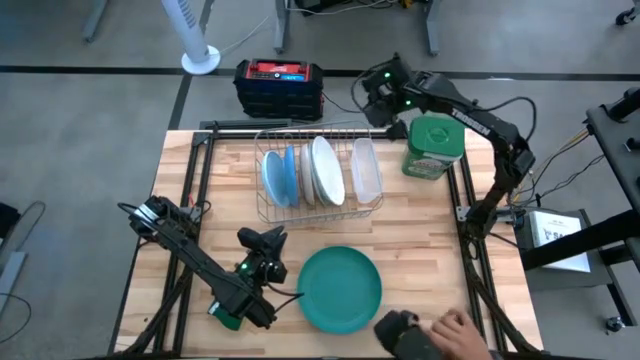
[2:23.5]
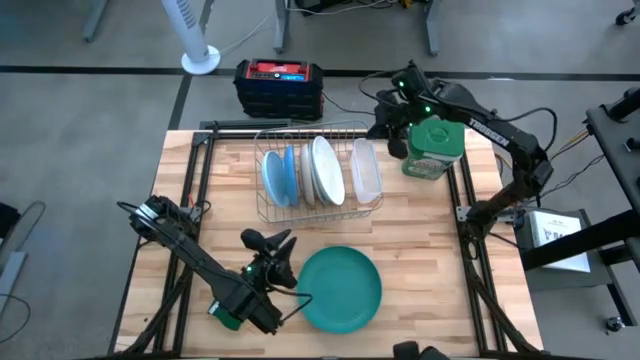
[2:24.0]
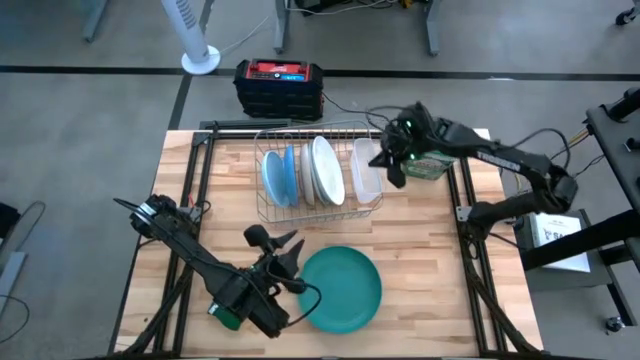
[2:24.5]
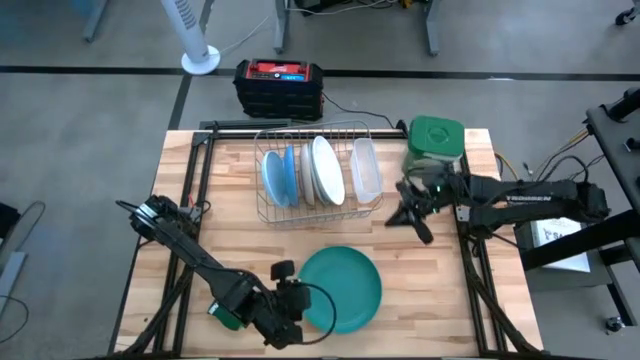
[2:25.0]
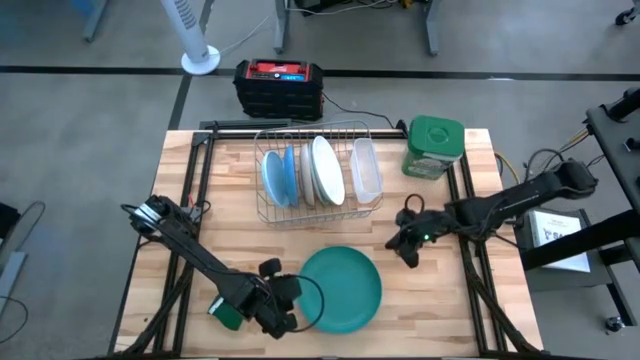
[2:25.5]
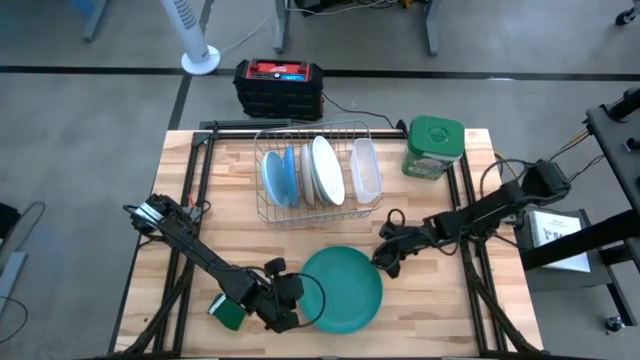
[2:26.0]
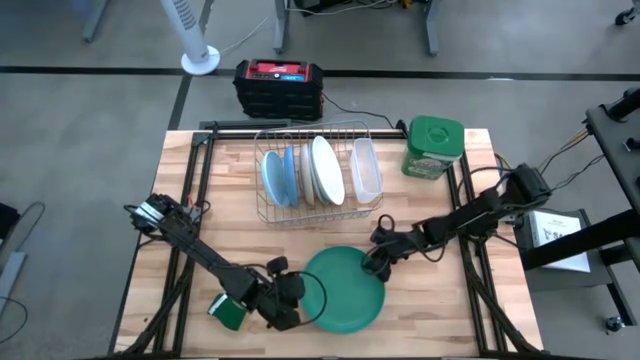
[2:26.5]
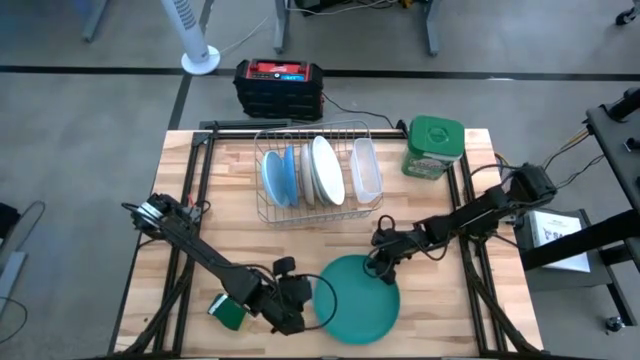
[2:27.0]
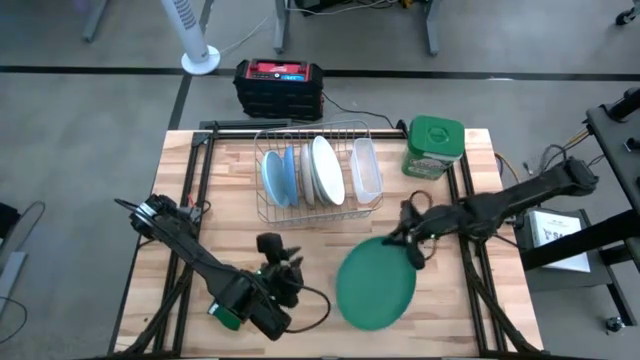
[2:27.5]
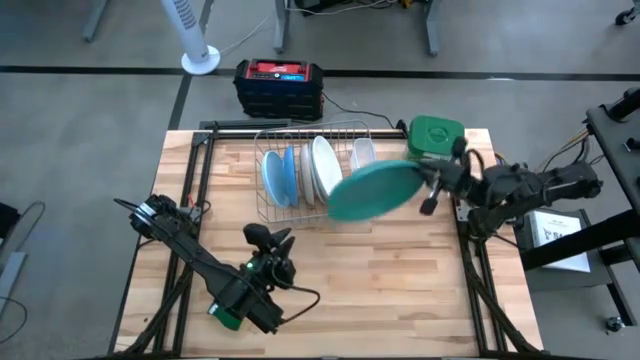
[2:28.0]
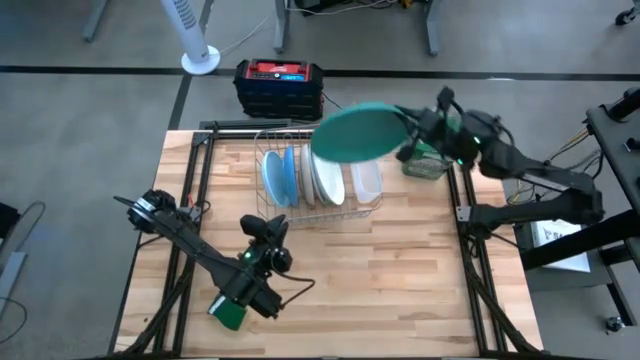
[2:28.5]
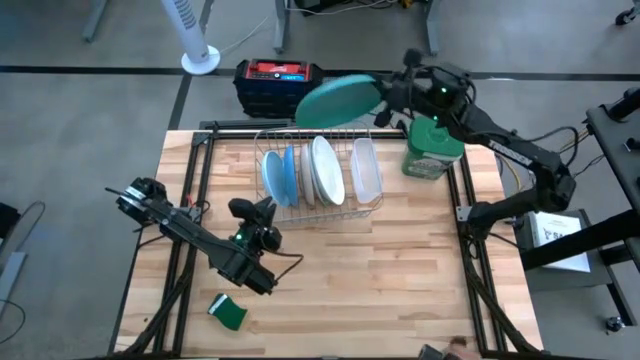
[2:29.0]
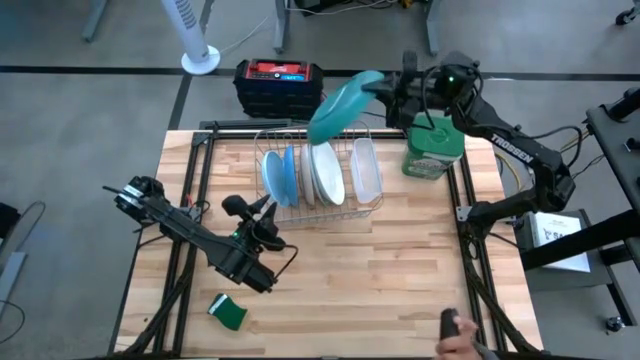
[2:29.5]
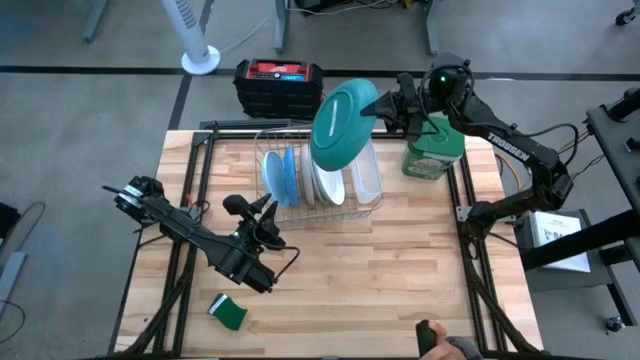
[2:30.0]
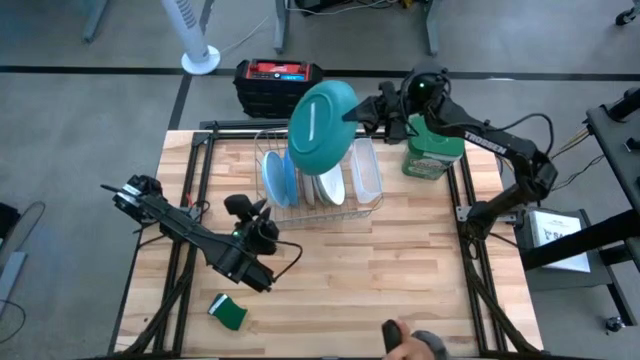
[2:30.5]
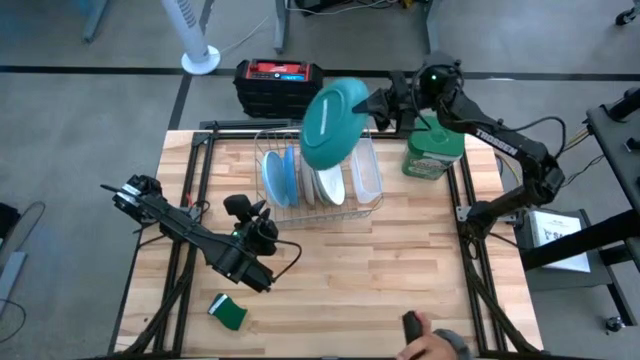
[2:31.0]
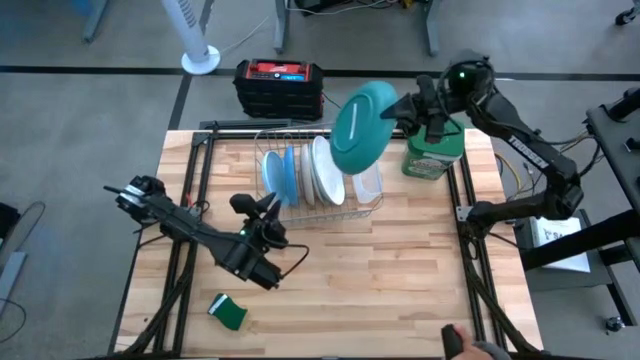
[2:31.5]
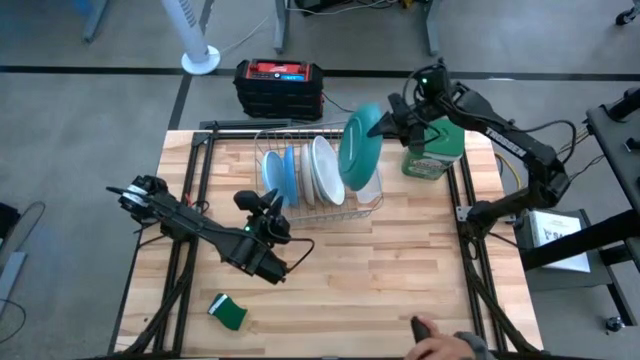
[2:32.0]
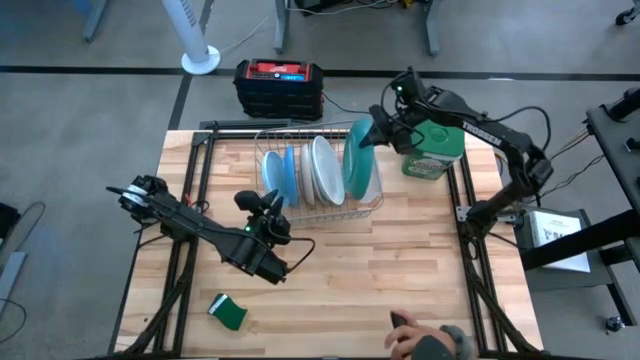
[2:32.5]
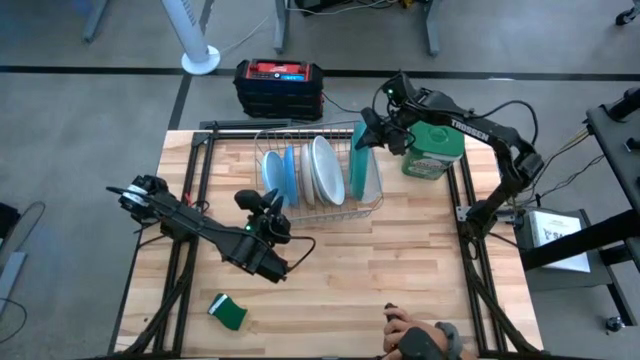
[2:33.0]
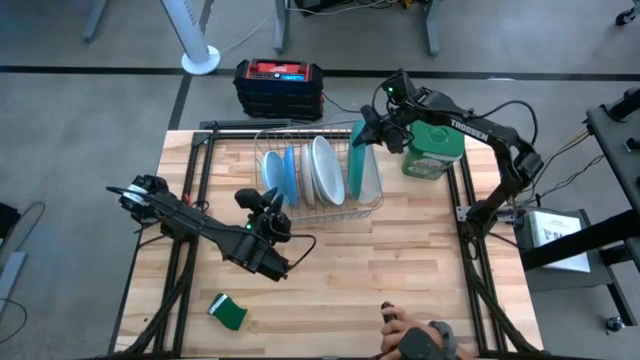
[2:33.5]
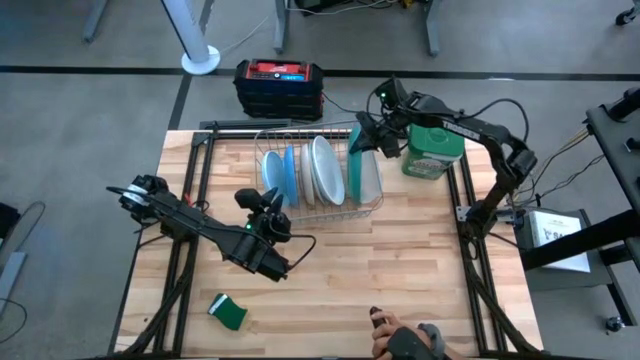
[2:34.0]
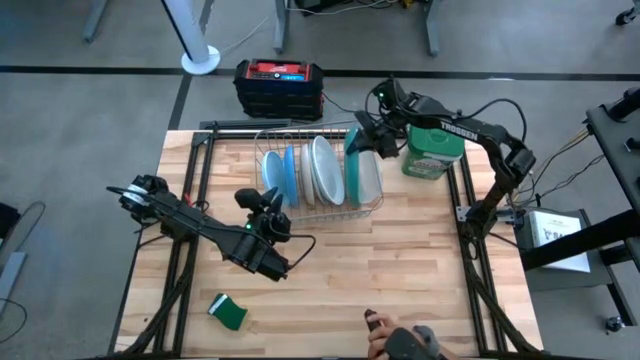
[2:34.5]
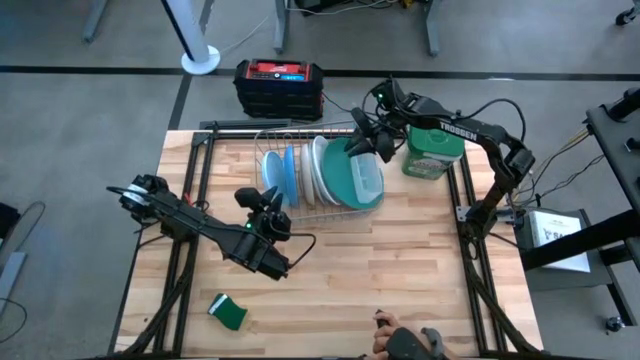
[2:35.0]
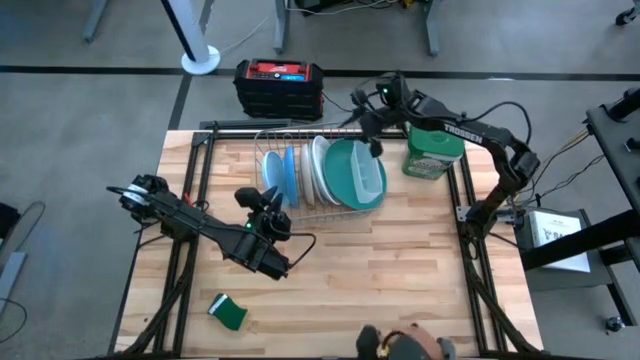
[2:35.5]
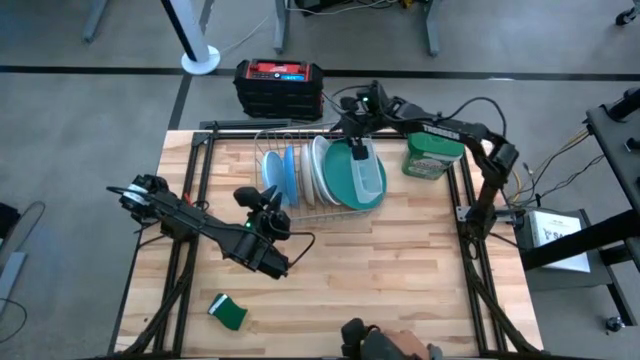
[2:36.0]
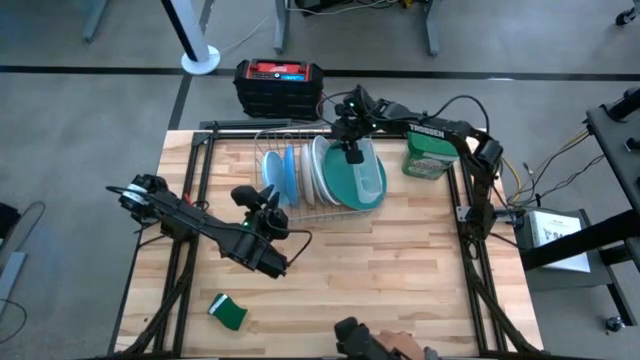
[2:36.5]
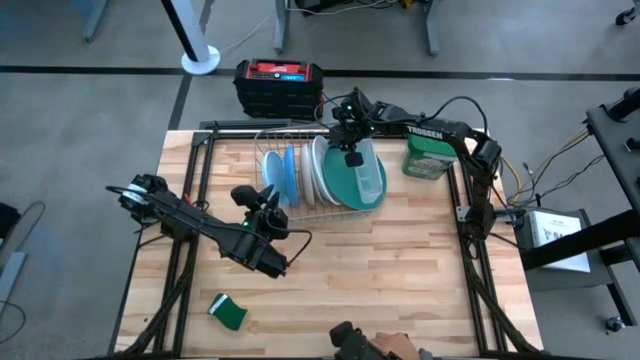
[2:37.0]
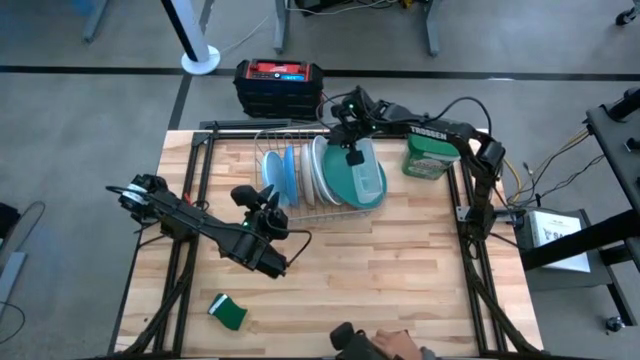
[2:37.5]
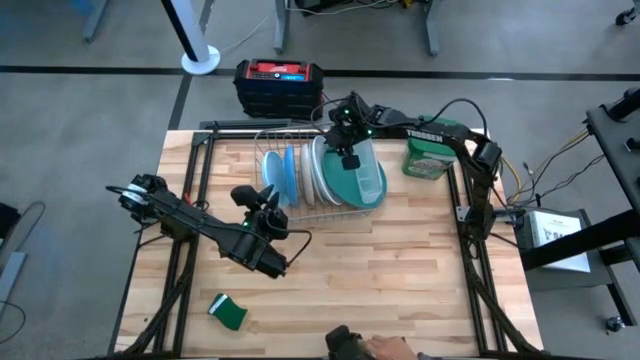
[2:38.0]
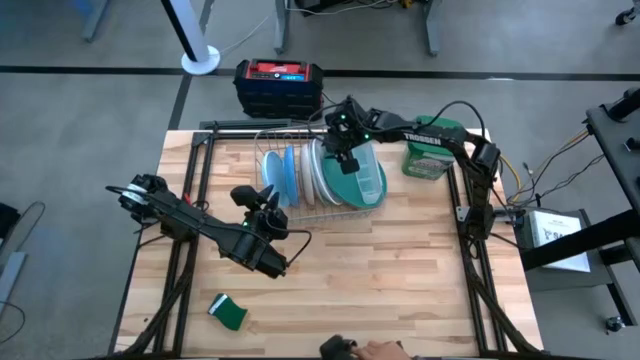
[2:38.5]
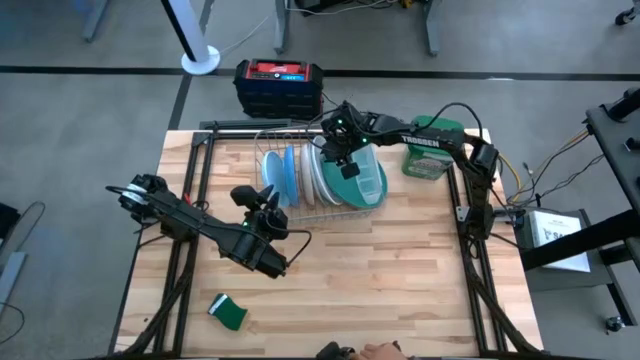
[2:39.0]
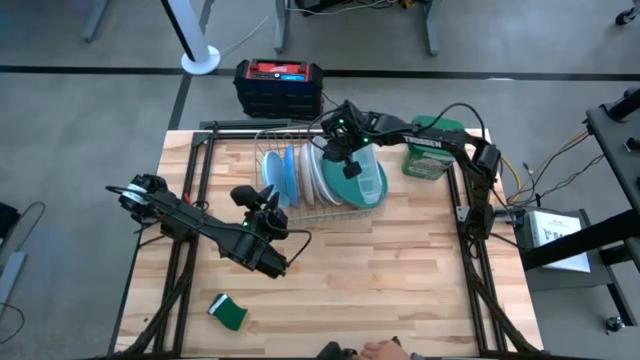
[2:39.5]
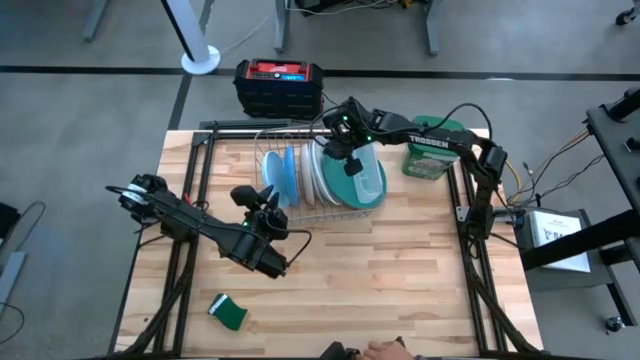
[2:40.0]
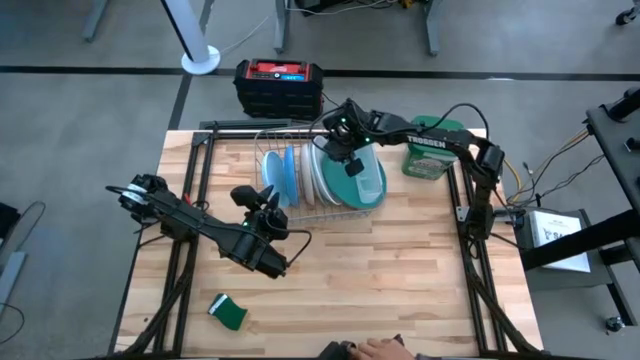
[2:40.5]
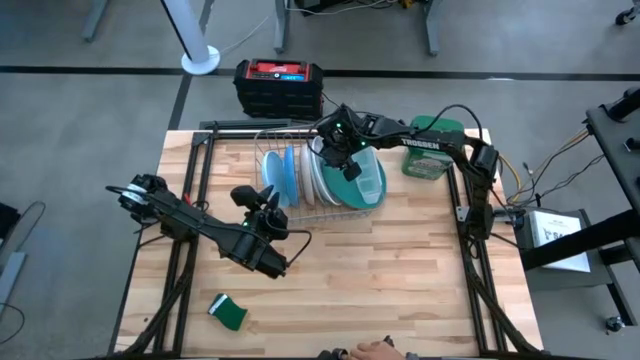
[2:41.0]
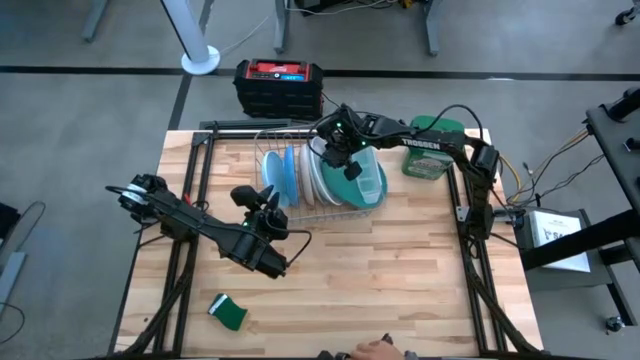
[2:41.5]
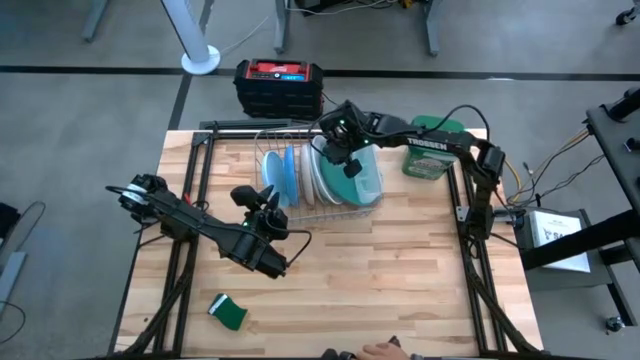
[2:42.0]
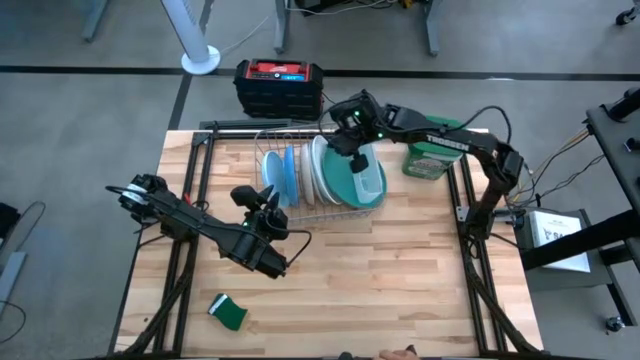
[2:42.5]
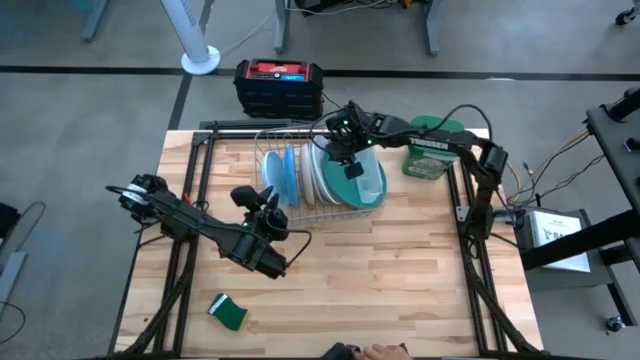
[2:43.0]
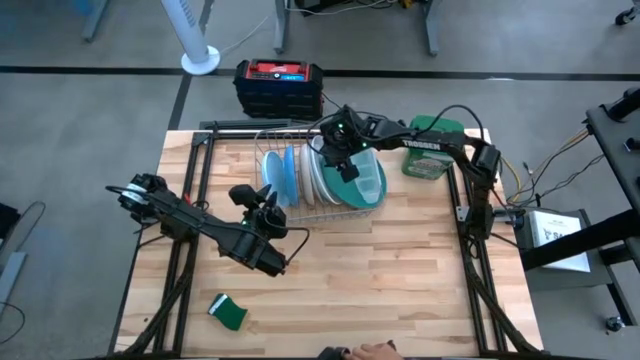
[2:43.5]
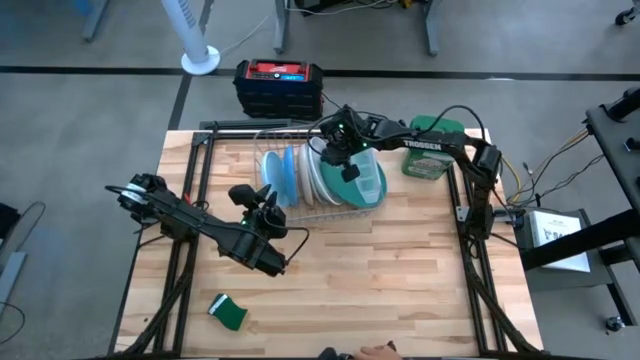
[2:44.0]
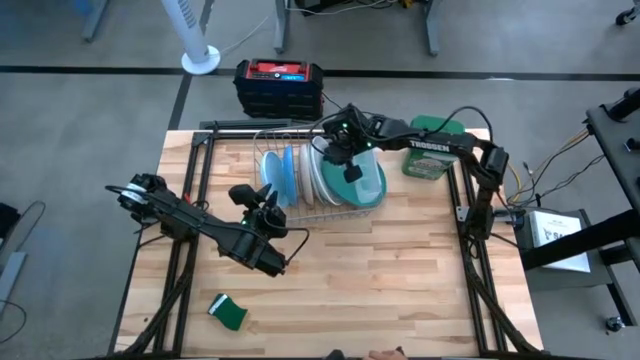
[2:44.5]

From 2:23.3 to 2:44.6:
Task: Sort dishes
Put the green plate in the dish rack
